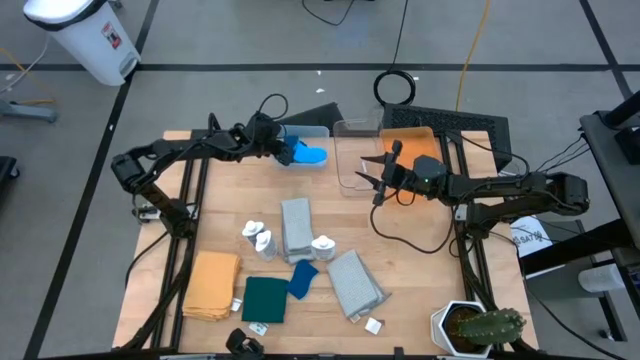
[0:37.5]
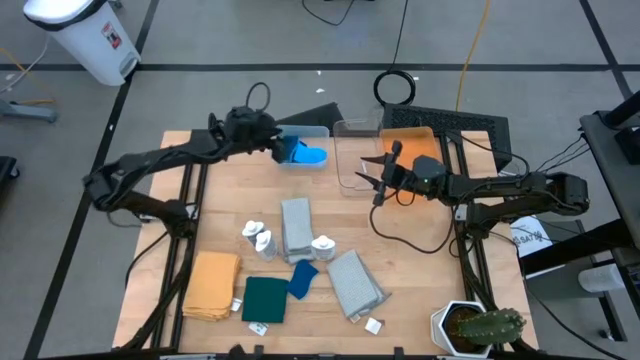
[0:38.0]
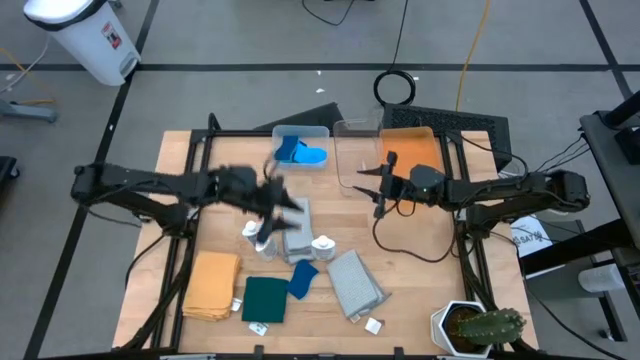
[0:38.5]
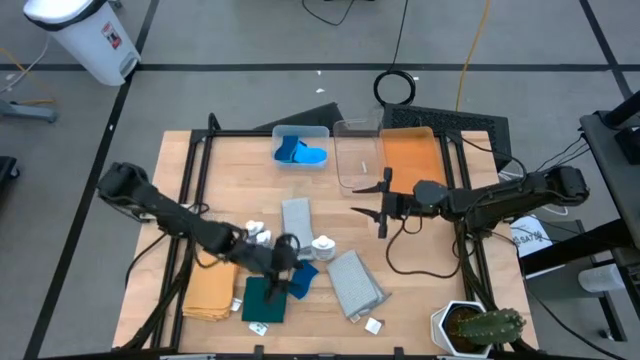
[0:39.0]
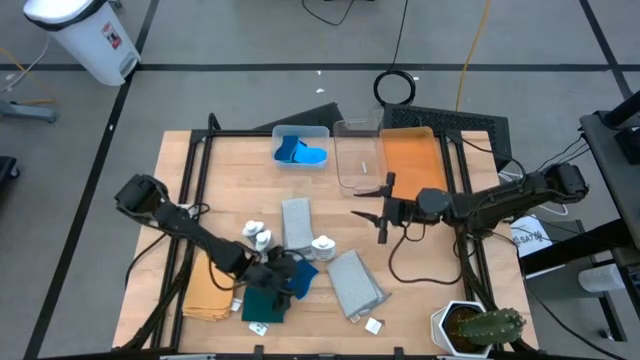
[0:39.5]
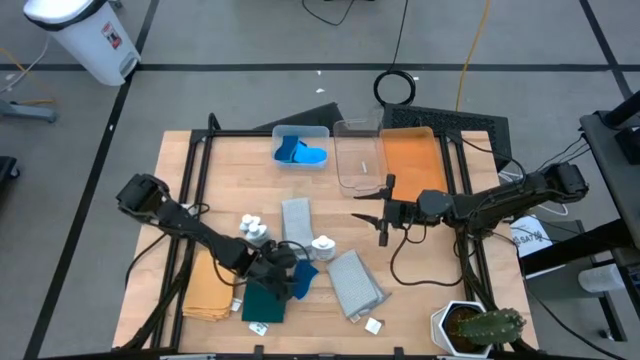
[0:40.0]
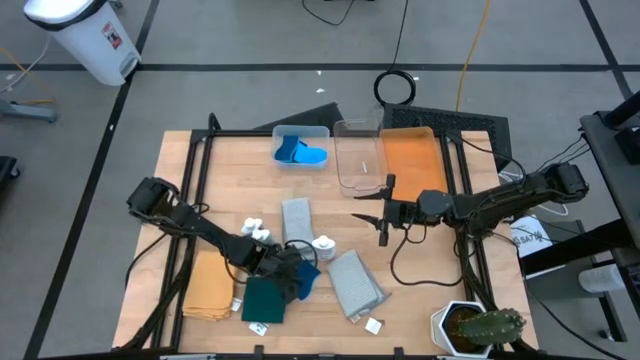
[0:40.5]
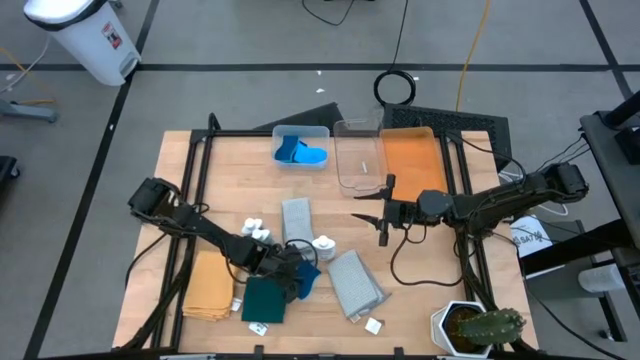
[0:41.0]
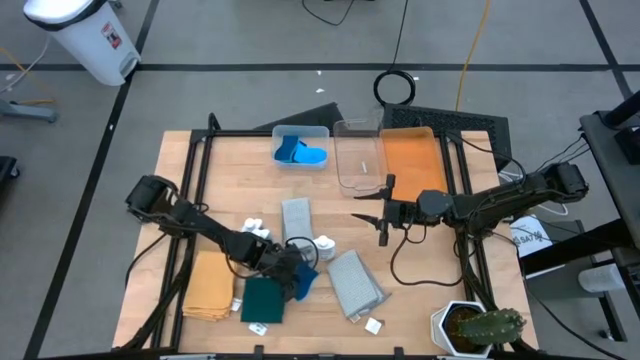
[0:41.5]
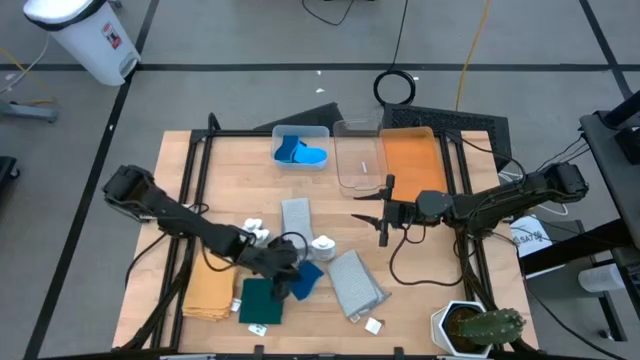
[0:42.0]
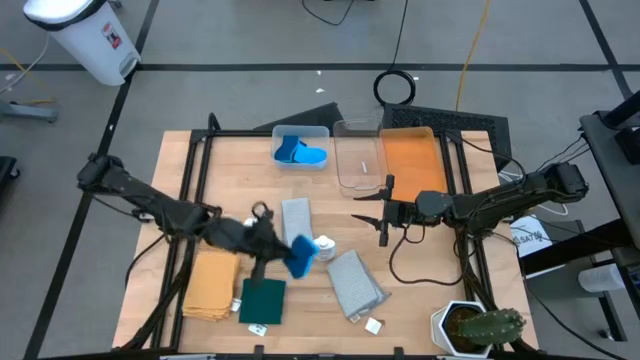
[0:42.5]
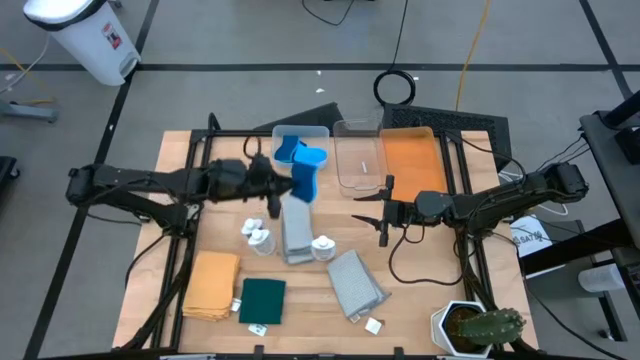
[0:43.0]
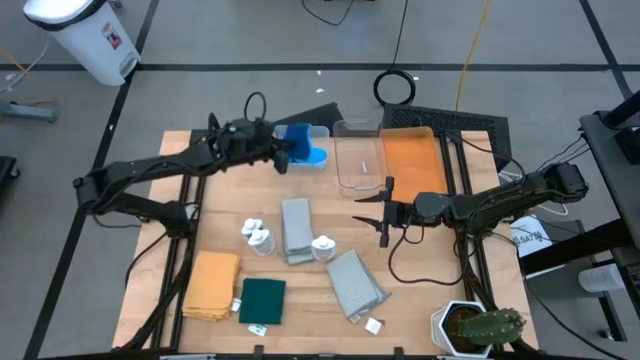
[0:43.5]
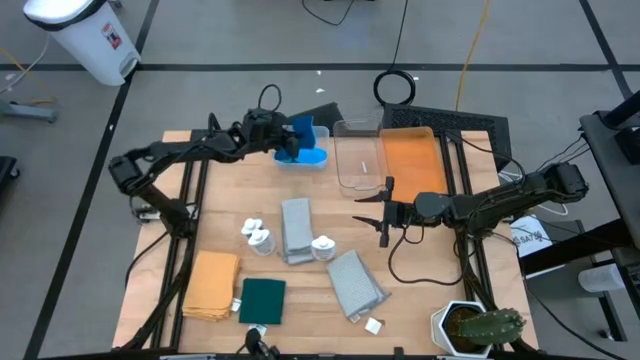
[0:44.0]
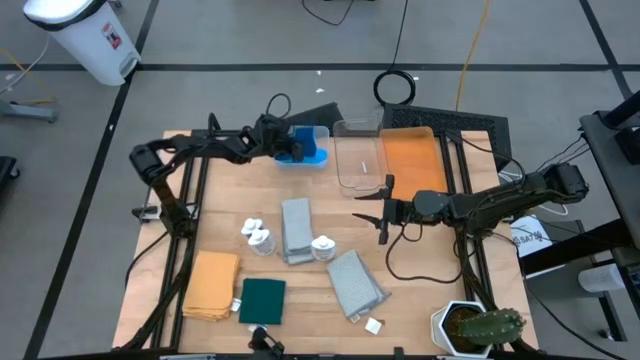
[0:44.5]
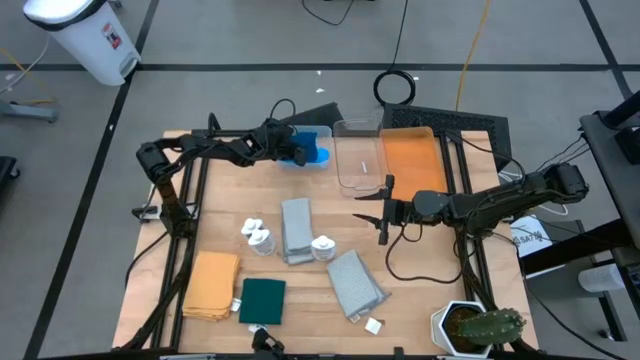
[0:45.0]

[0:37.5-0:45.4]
Task: Pick & Place Kitchen Items
Put the blue sponge into the white bin

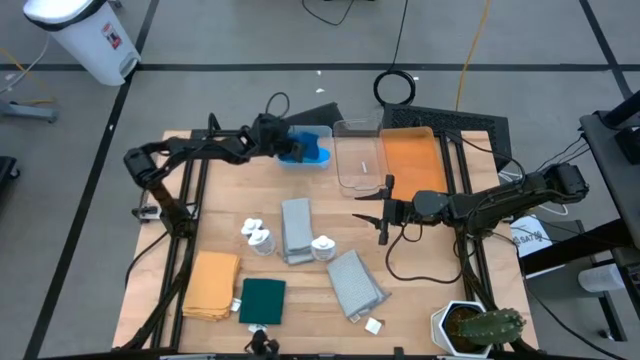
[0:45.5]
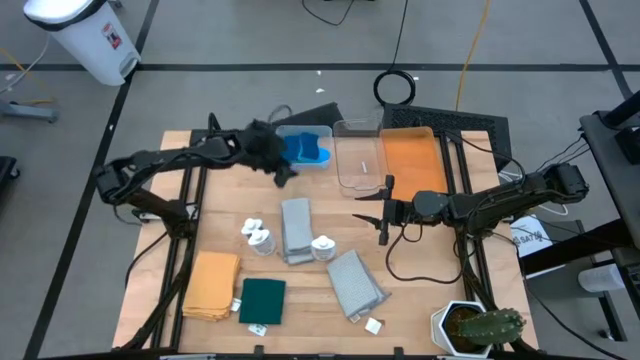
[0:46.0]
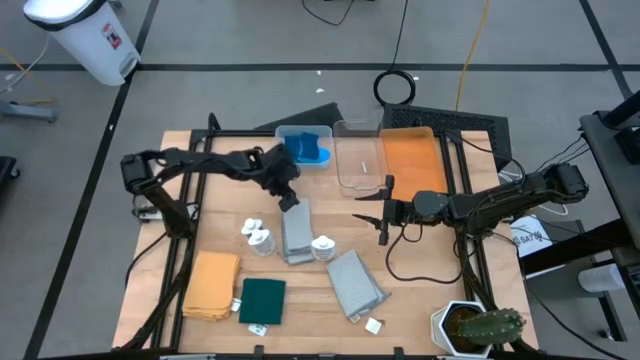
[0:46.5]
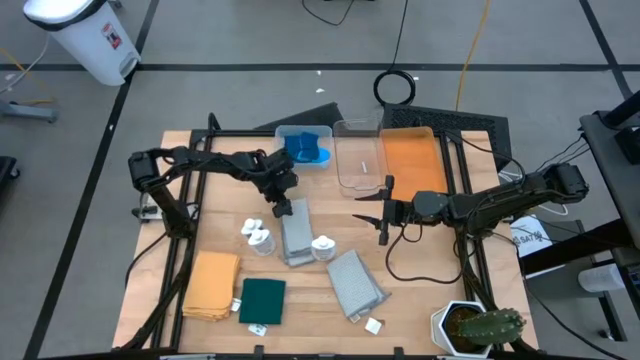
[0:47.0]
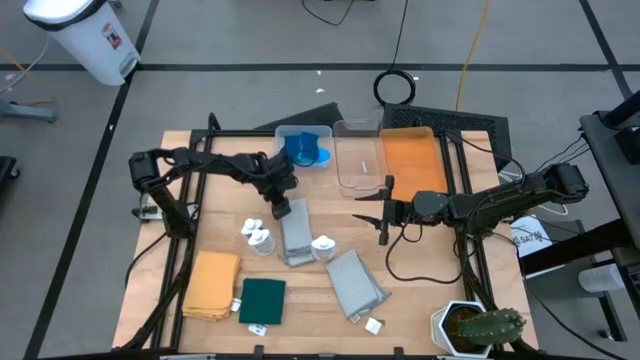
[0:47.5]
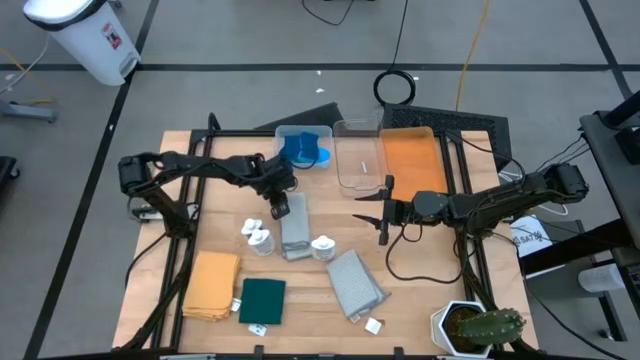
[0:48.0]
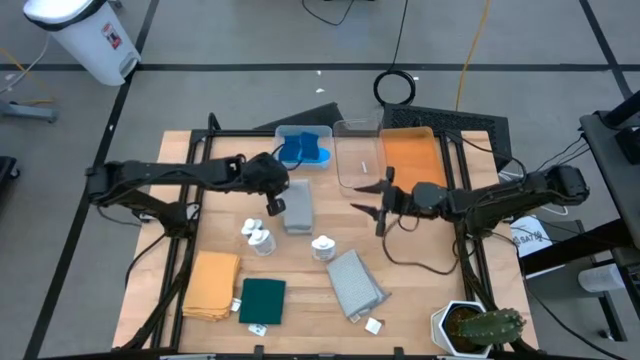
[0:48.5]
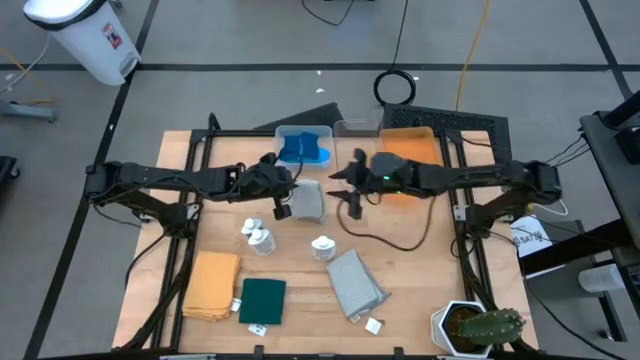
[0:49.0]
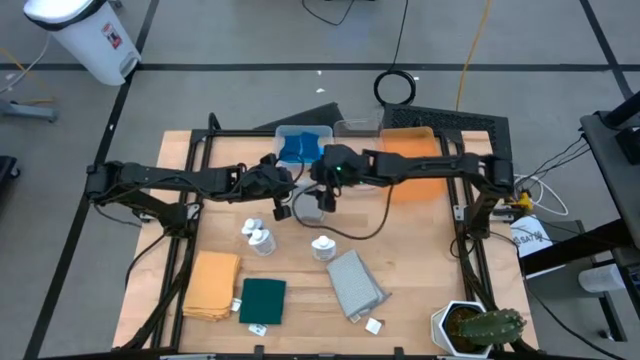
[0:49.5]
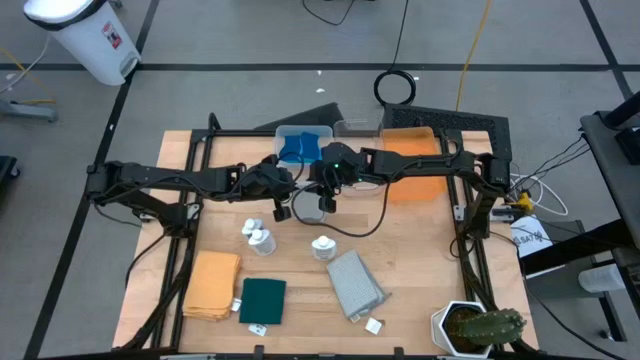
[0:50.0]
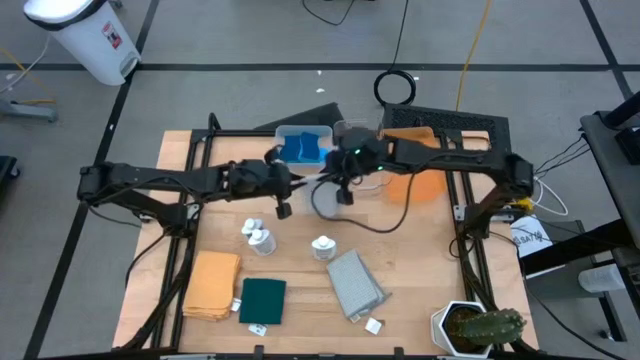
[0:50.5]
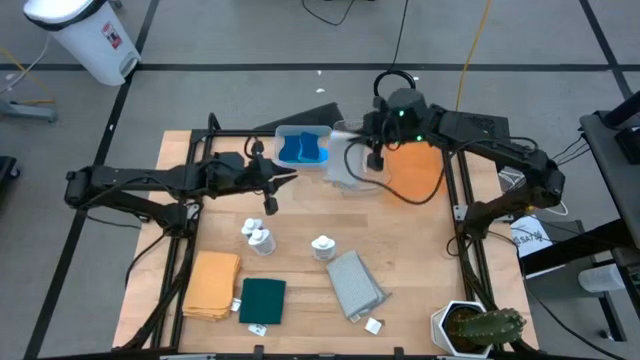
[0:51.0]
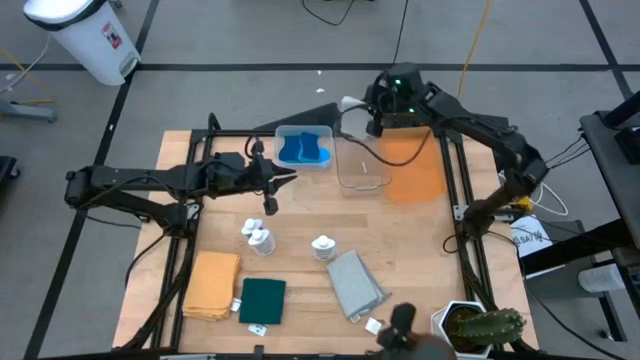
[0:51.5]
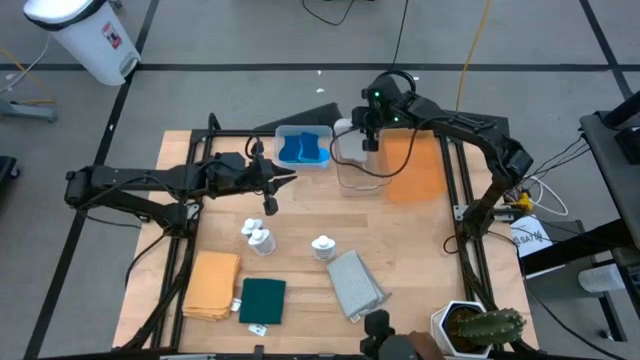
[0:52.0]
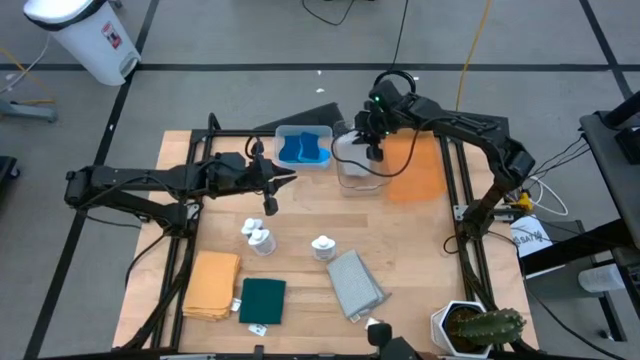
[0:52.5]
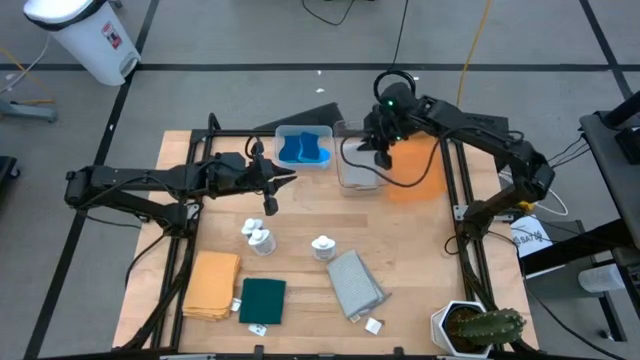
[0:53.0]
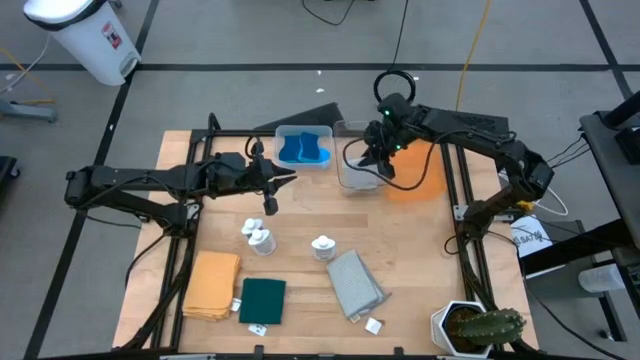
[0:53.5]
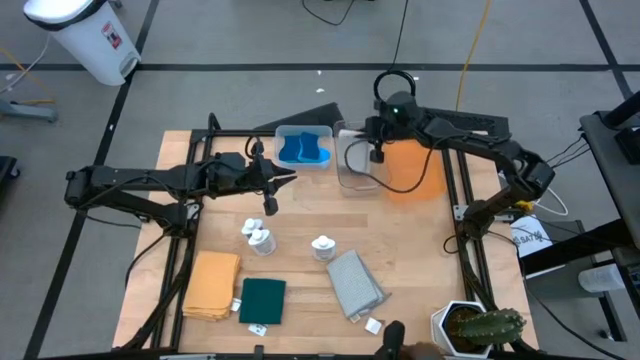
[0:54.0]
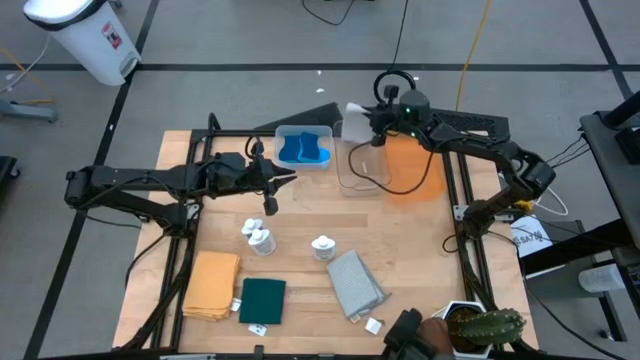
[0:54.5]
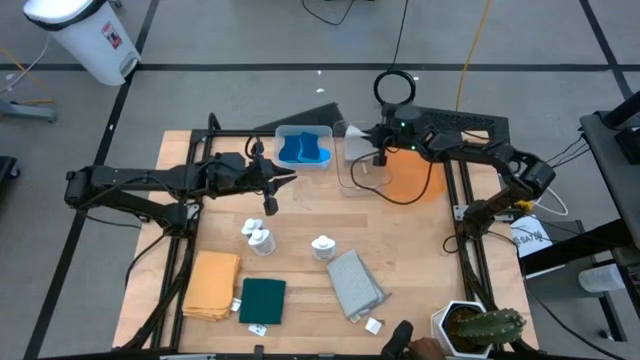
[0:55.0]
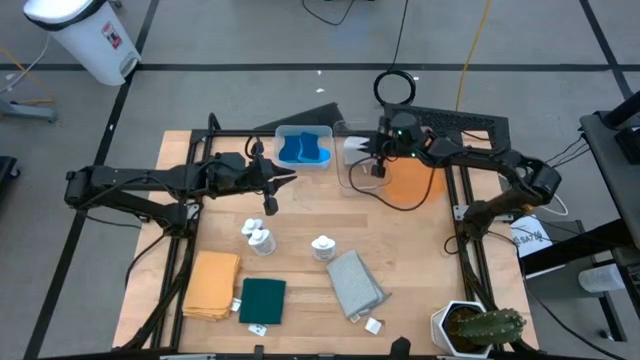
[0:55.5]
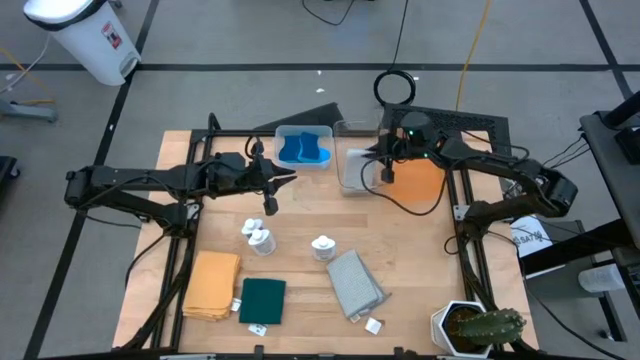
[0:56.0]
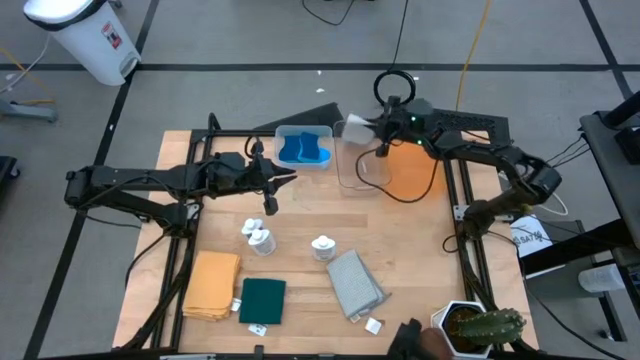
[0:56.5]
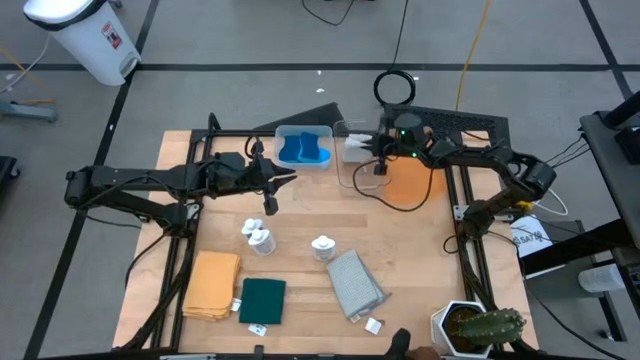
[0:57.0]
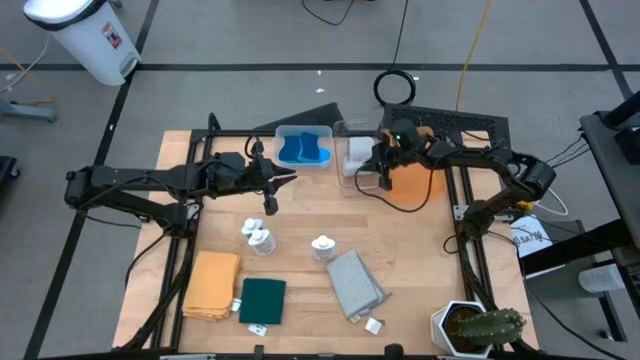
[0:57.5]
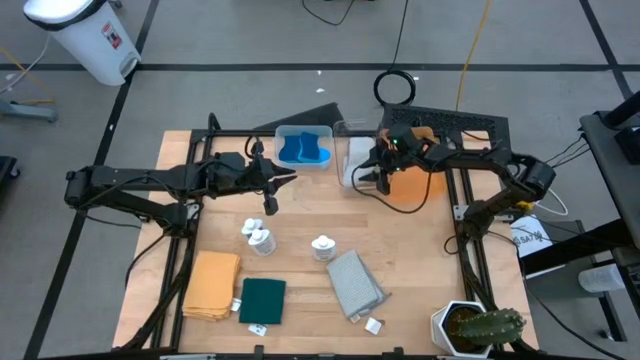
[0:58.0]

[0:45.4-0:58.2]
Put the gray towel into the transparent bin
